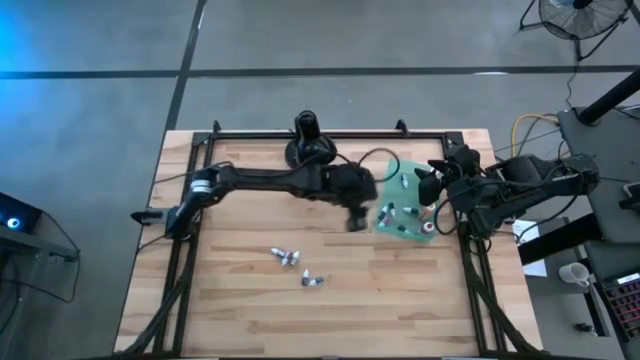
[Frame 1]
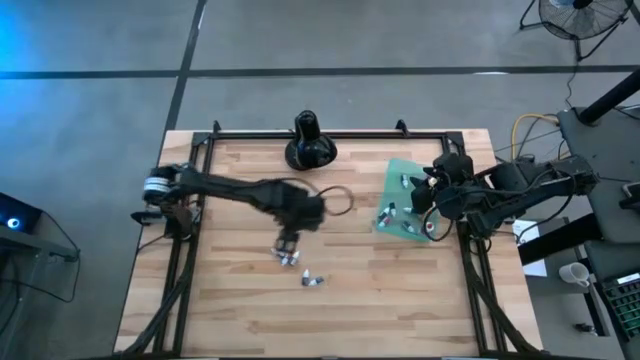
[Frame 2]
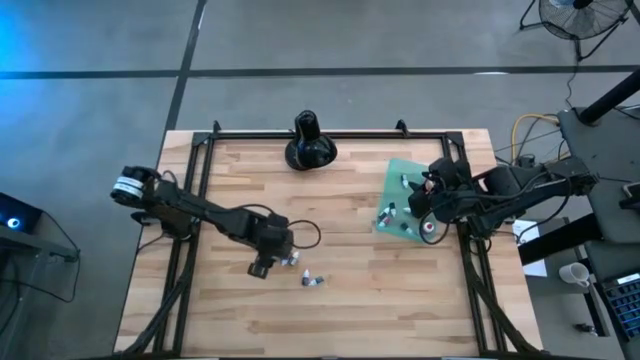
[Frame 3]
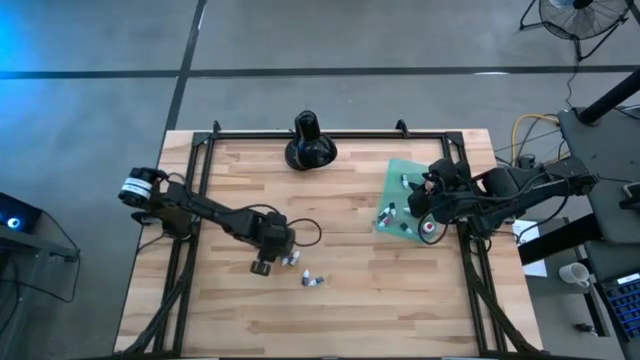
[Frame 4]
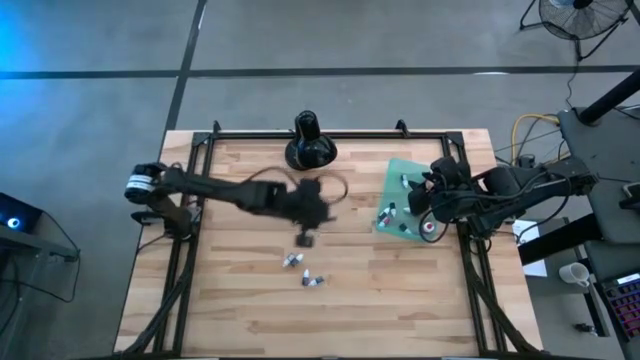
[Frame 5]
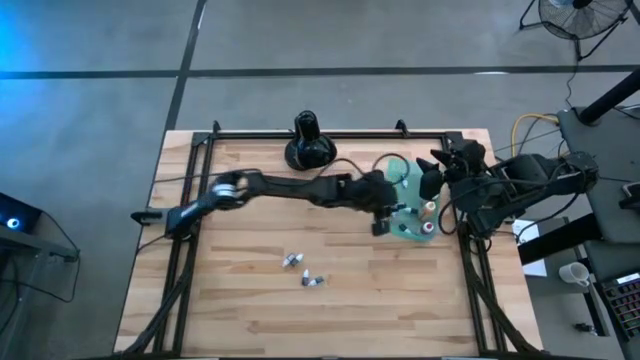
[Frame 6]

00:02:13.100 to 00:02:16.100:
Task: Pick & Place food coloring
Put the top small purple food coloring bottle into the green bin

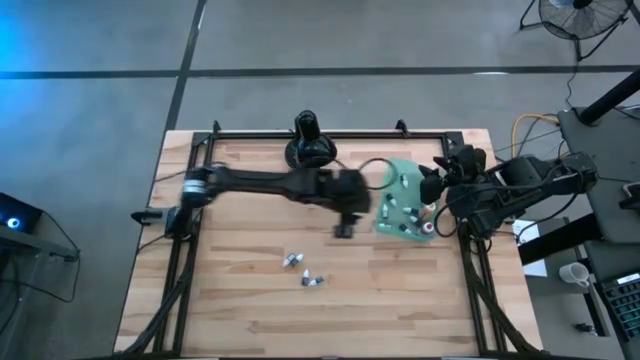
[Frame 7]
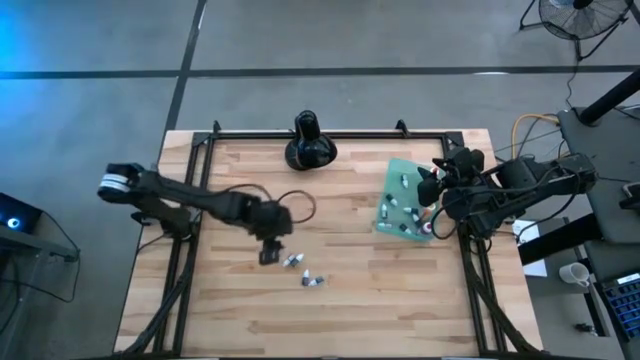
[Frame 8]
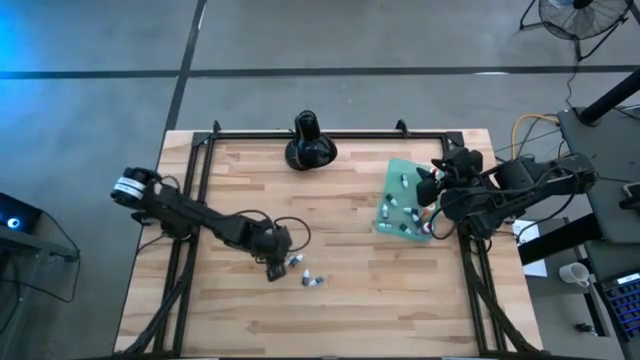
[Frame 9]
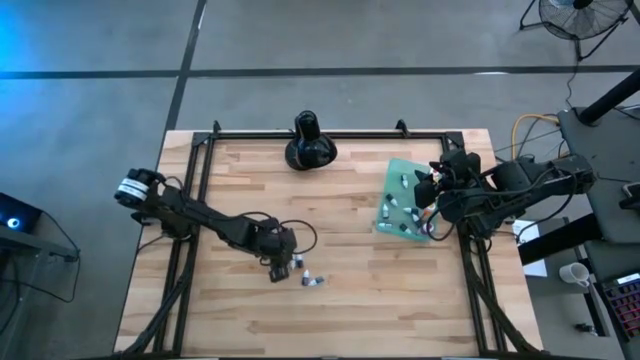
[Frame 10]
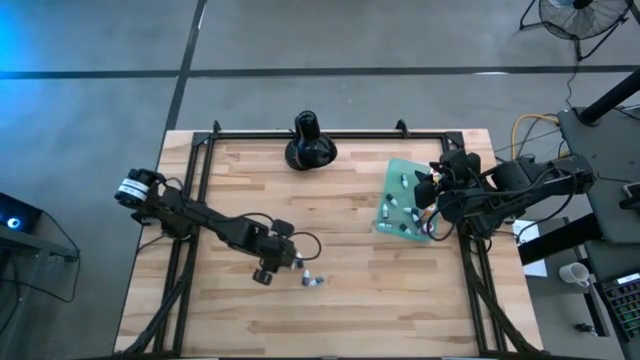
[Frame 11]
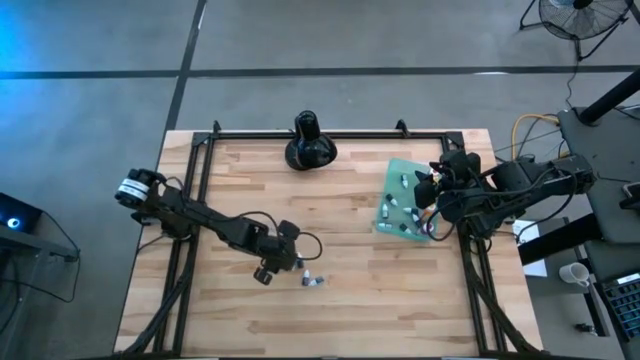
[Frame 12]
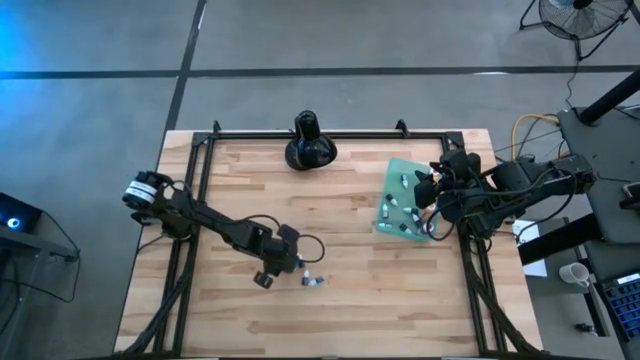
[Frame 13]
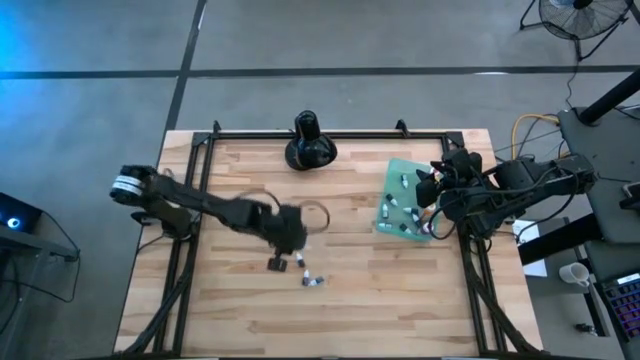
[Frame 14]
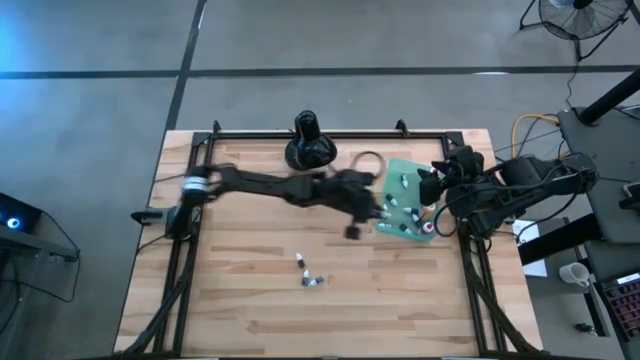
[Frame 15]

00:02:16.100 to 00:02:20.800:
Put the small red food coloring bottle into the green bin

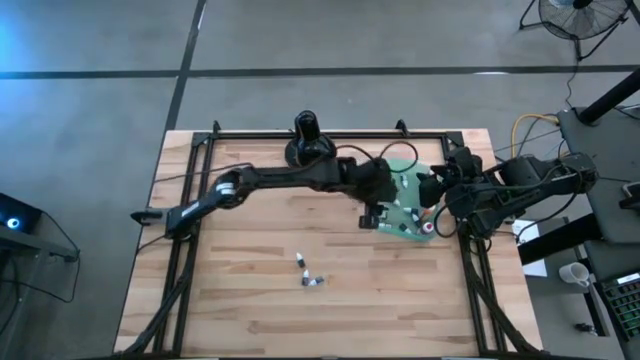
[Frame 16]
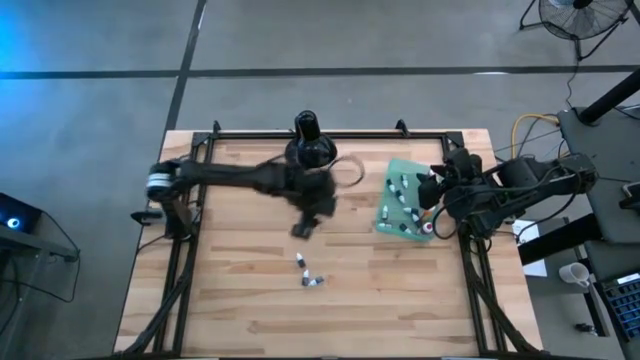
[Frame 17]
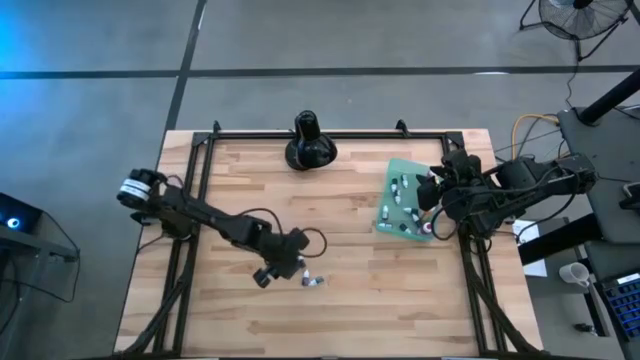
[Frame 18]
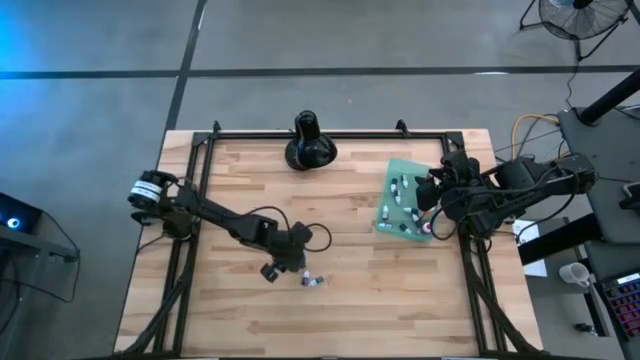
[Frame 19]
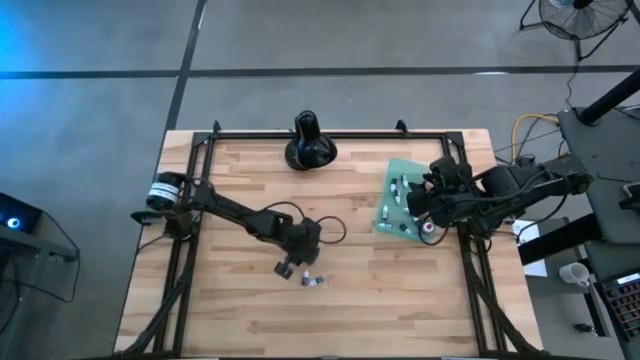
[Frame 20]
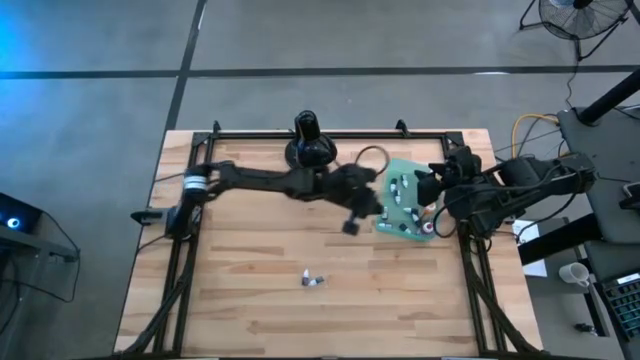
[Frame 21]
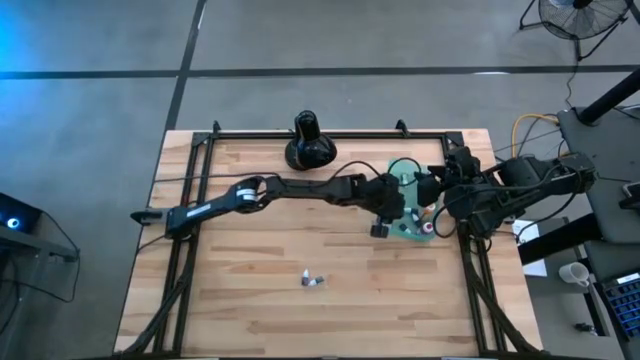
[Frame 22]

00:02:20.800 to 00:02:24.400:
Put the small black food coloring bottle into the green bin

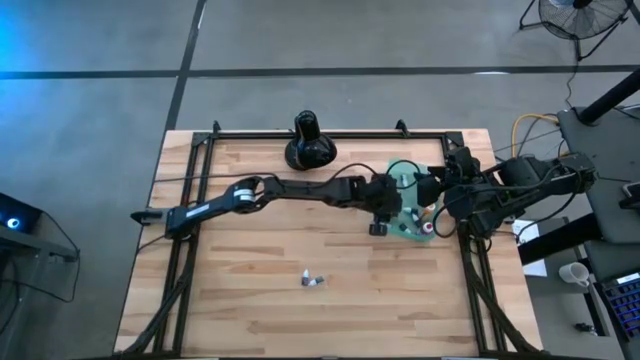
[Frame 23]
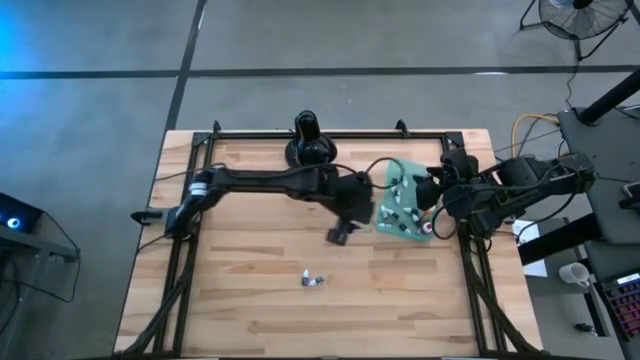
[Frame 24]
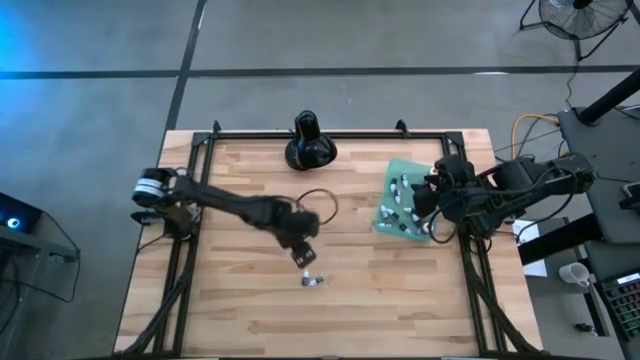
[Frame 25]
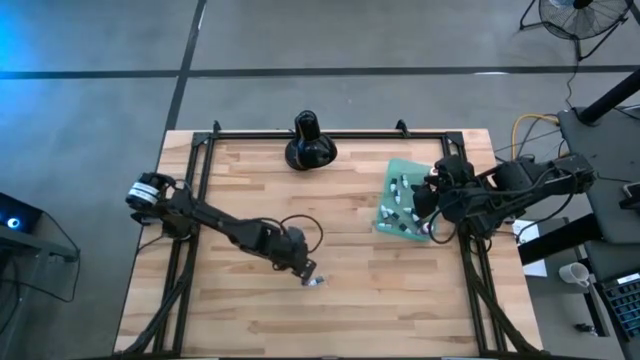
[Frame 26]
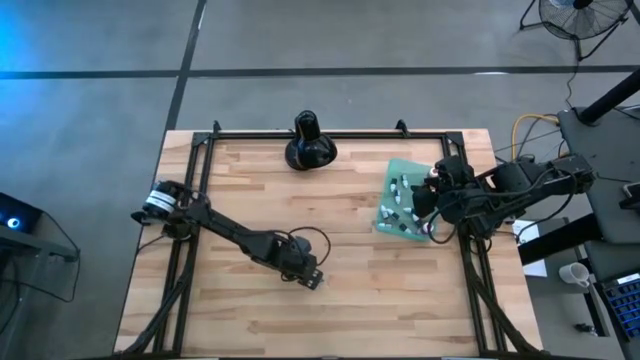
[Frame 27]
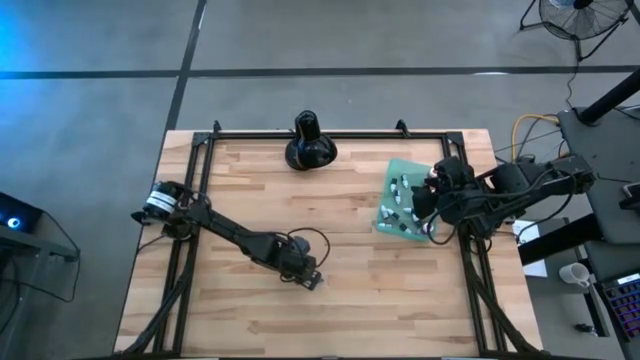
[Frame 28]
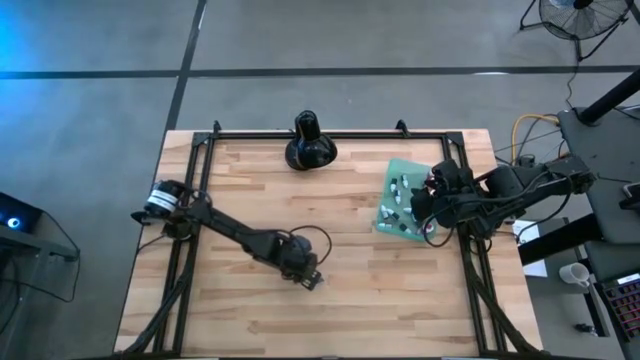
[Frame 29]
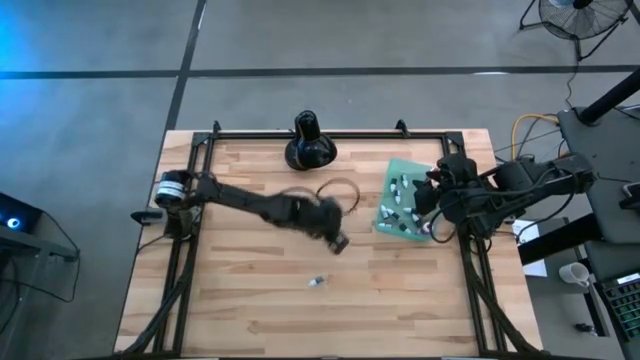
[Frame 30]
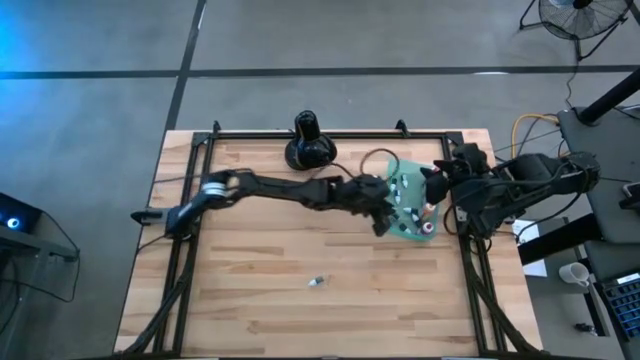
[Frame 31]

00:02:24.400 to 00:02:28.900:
Put the left small purple food coloring bottle into the green bin

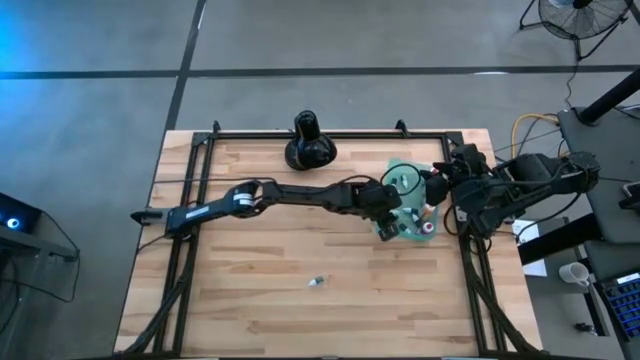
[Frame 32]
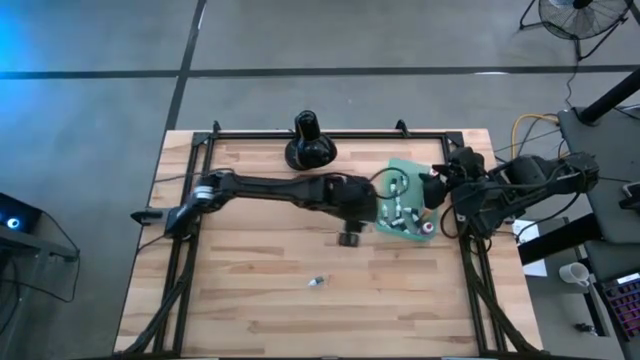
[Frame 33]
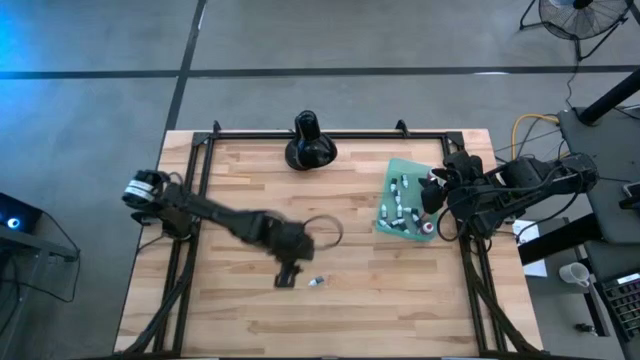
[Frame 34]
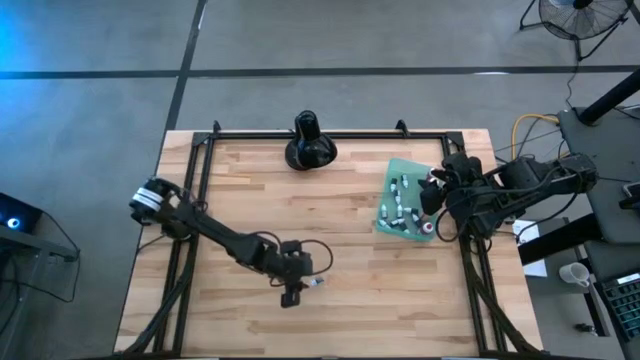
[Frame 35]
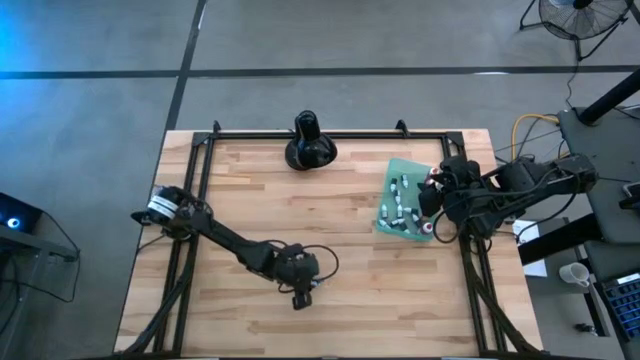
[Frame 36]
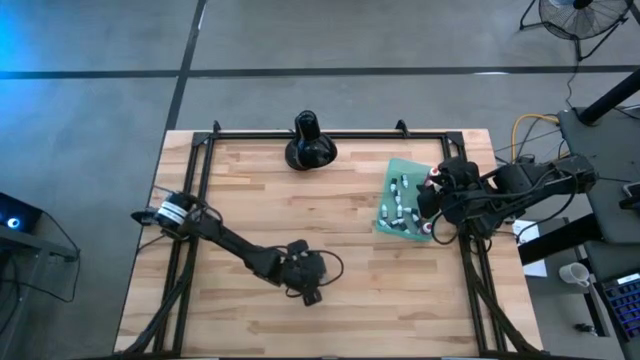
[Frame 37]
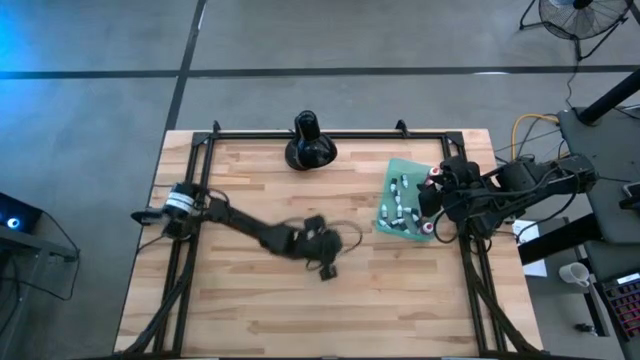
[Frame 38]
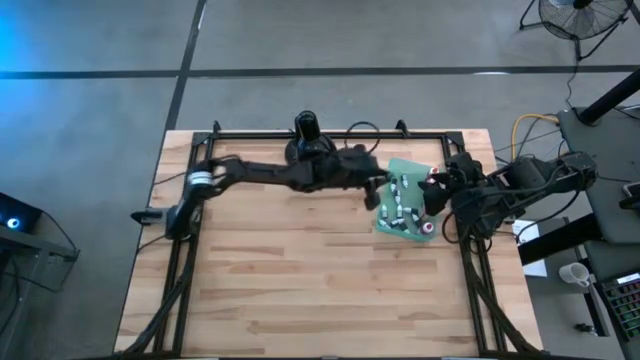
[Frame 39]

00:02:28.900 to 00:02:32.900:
Put the small purple food coloring bottle into the green bin

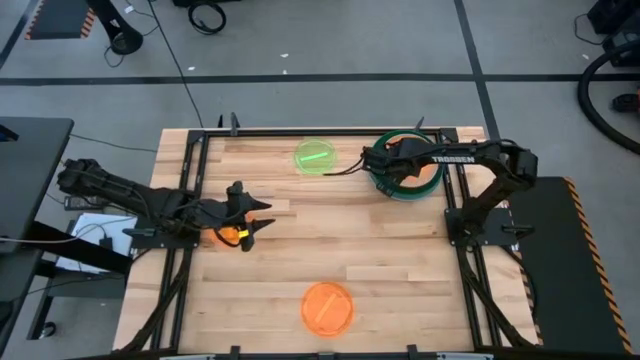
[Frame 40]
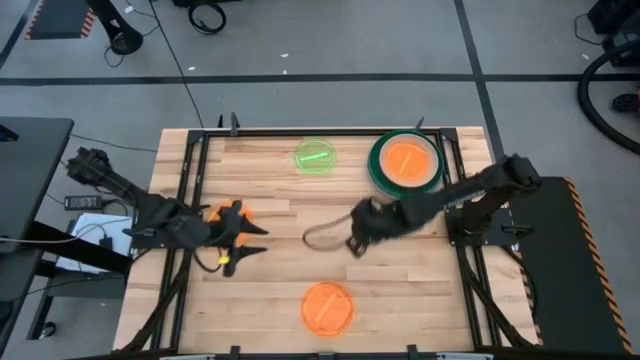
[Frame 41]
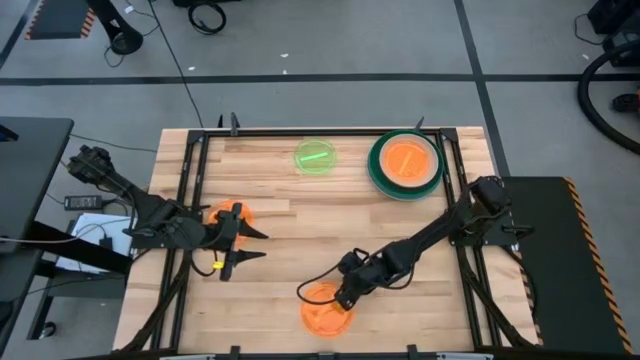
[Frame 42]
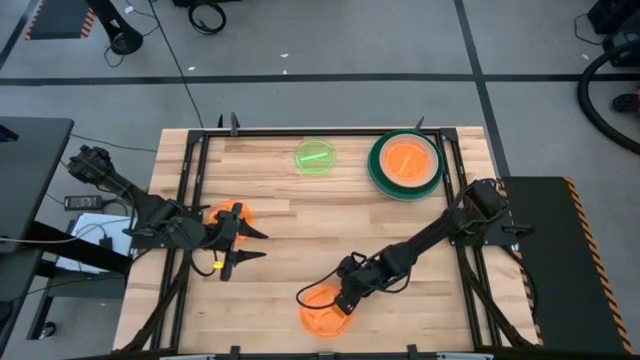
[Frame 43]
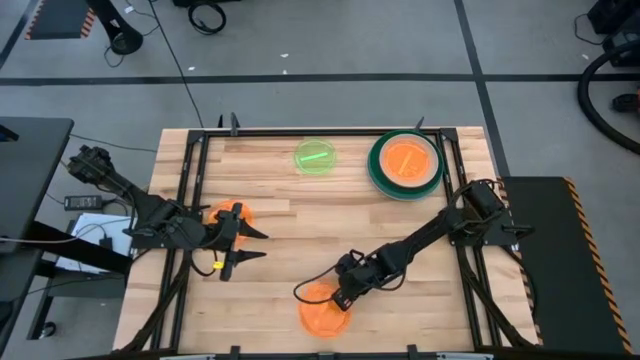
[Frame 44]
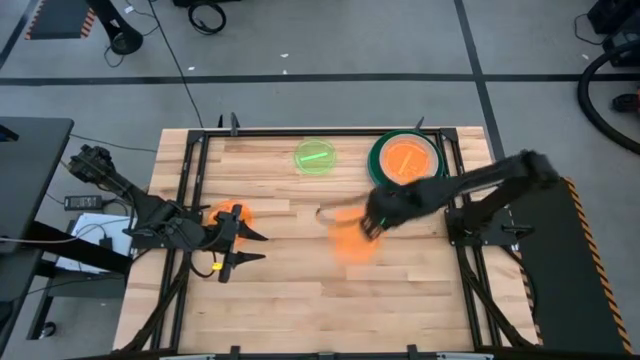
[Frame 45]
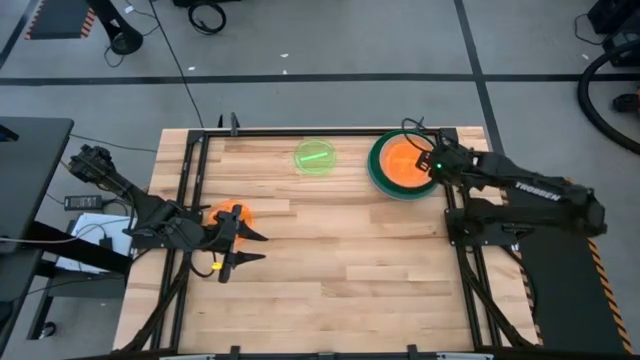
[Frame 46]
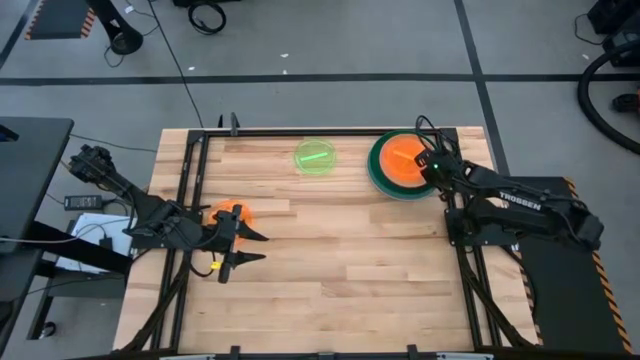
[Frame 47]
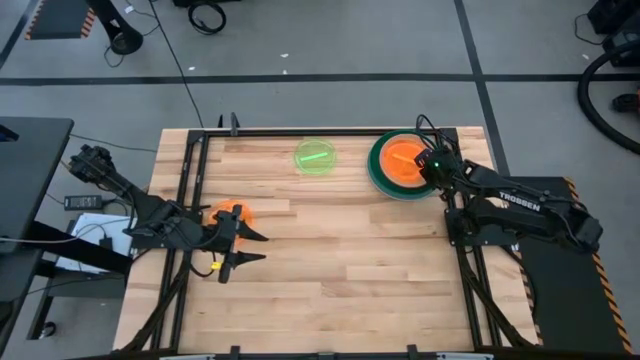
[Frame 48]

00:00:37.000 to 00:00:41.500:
Task: Stack plastic plates
Stack the bottom light orange plate on top of the top right light orange plate
